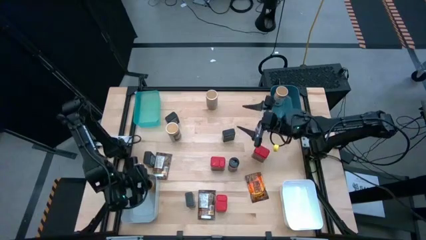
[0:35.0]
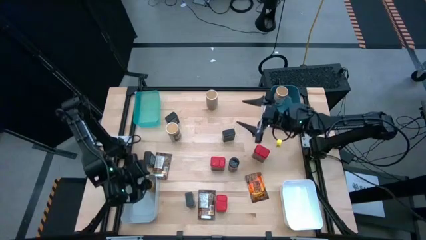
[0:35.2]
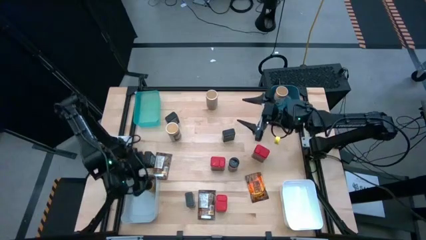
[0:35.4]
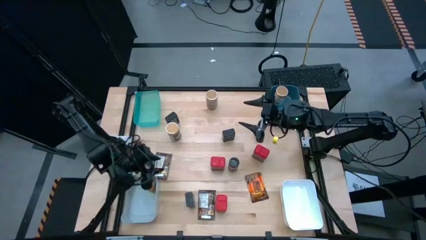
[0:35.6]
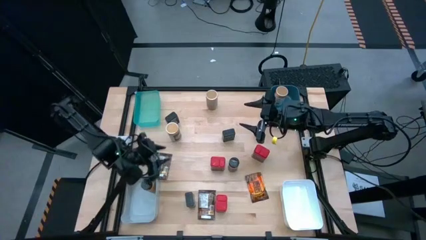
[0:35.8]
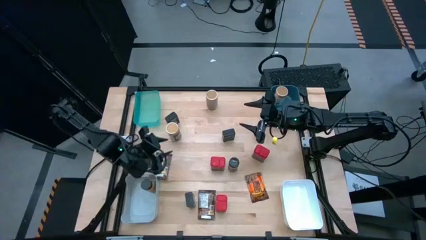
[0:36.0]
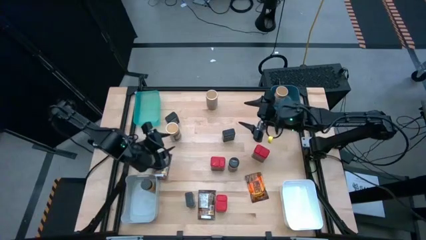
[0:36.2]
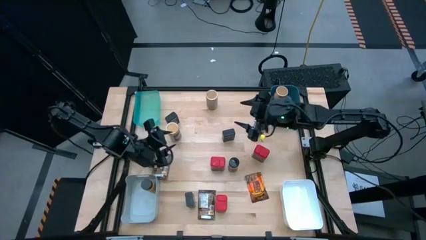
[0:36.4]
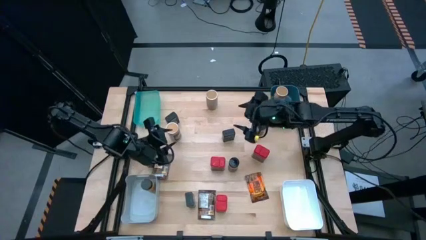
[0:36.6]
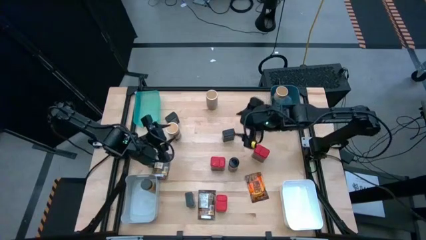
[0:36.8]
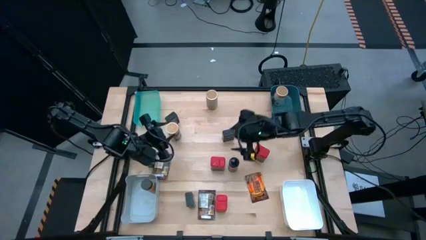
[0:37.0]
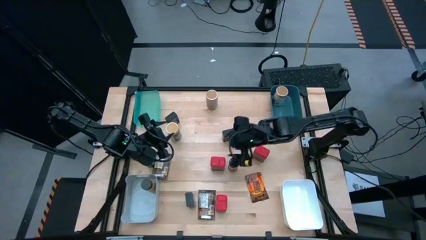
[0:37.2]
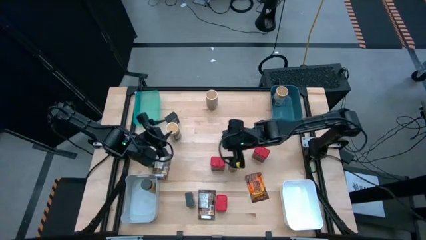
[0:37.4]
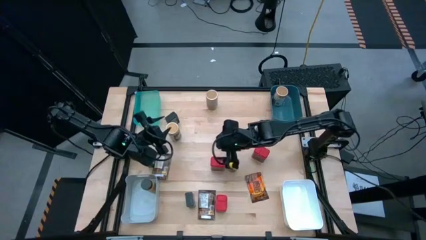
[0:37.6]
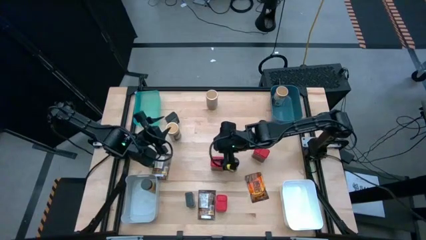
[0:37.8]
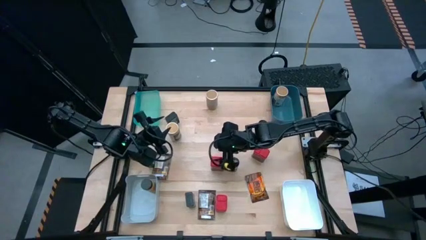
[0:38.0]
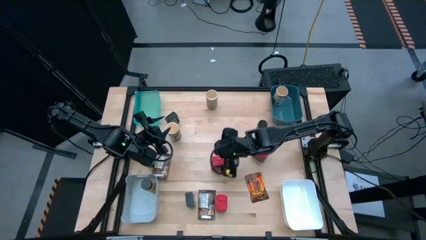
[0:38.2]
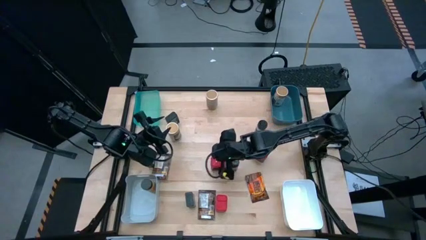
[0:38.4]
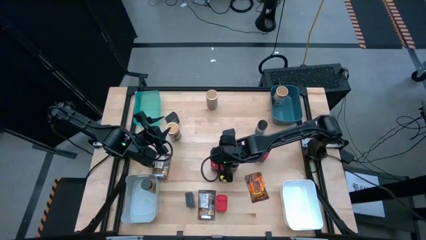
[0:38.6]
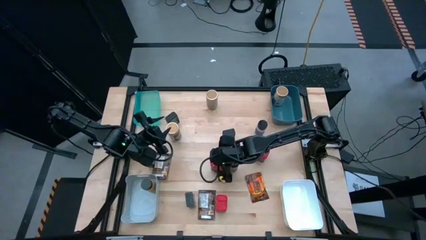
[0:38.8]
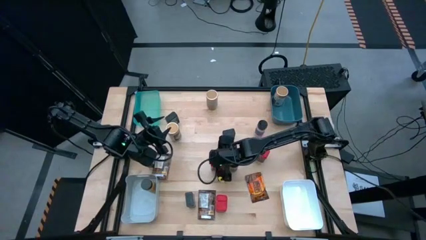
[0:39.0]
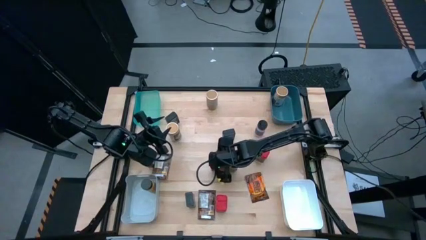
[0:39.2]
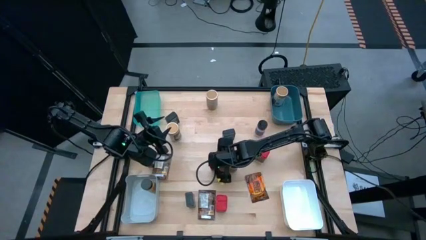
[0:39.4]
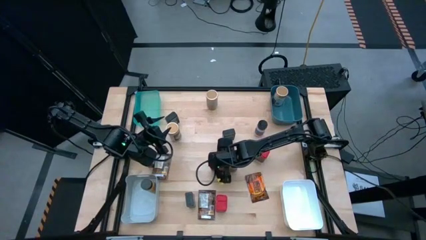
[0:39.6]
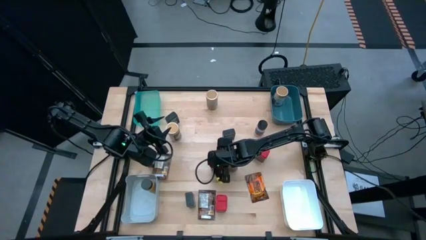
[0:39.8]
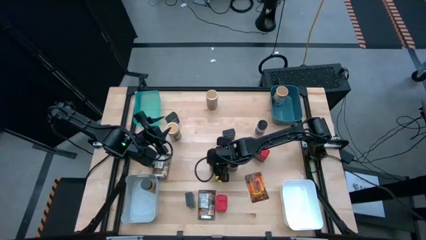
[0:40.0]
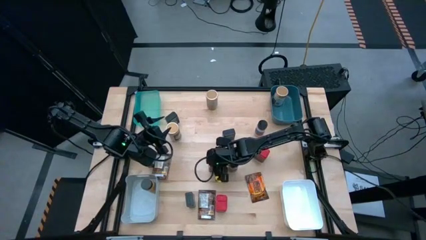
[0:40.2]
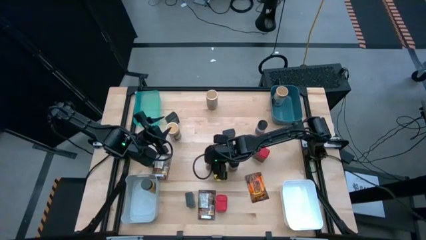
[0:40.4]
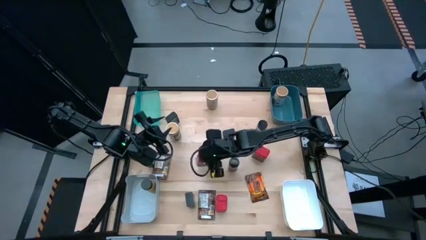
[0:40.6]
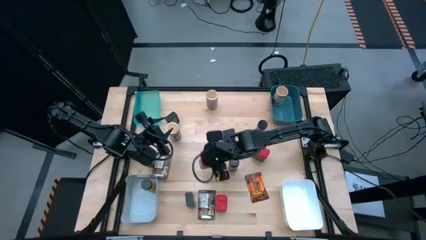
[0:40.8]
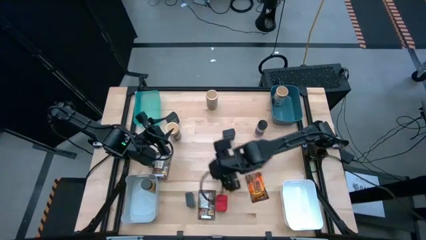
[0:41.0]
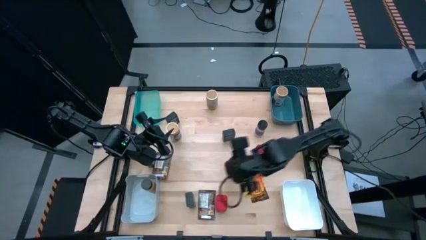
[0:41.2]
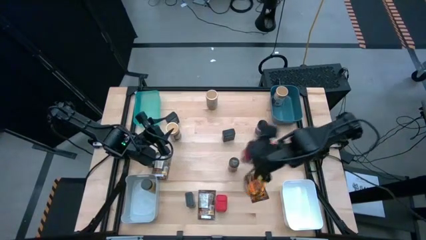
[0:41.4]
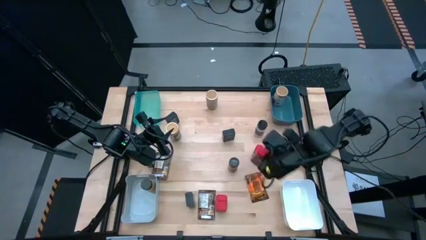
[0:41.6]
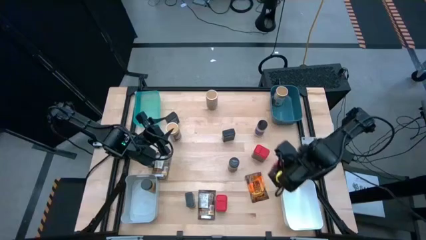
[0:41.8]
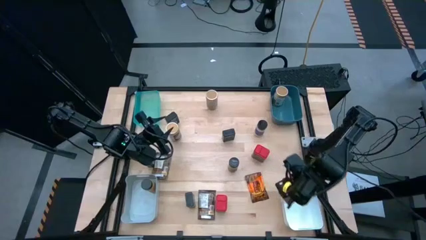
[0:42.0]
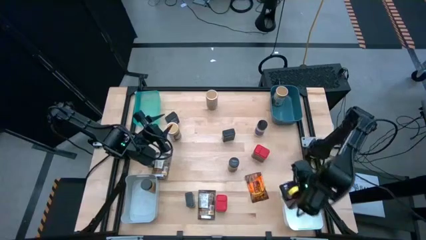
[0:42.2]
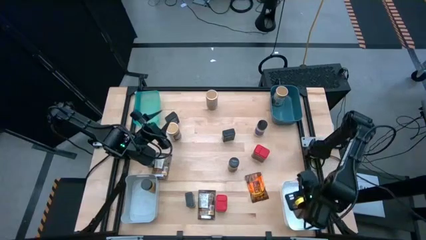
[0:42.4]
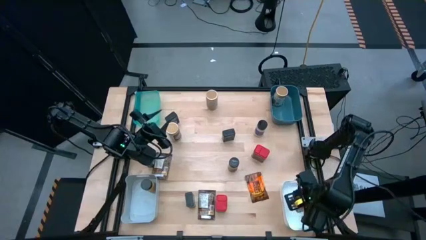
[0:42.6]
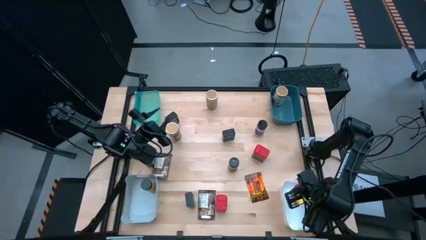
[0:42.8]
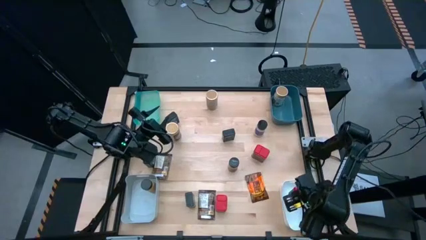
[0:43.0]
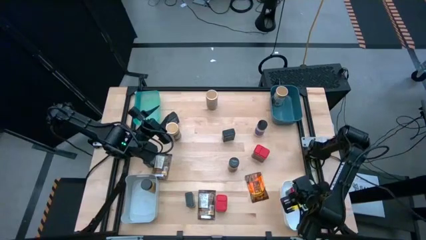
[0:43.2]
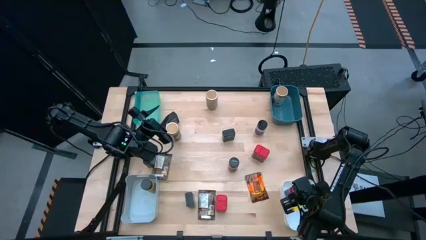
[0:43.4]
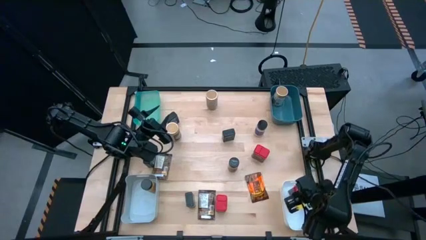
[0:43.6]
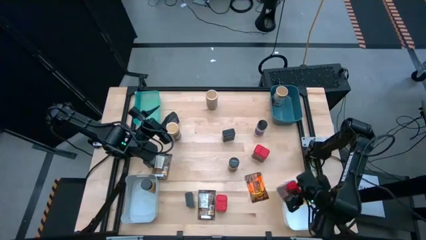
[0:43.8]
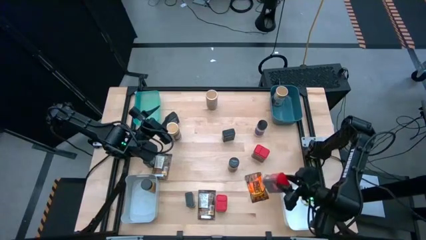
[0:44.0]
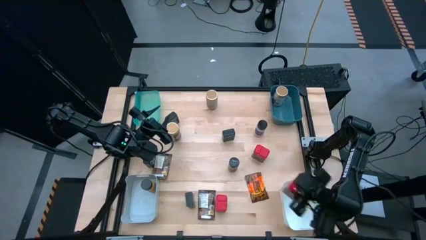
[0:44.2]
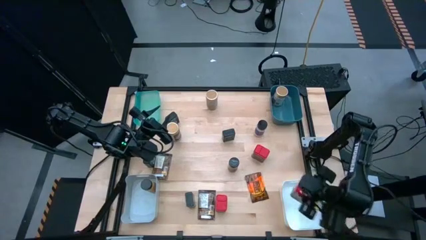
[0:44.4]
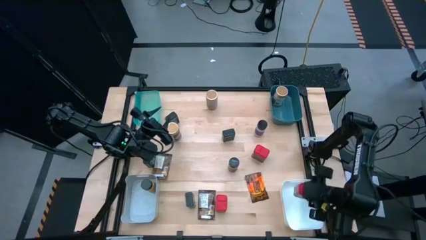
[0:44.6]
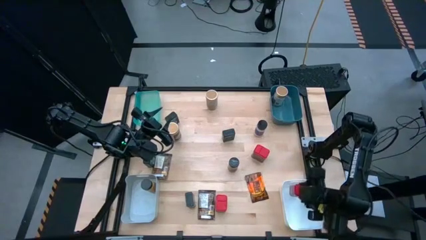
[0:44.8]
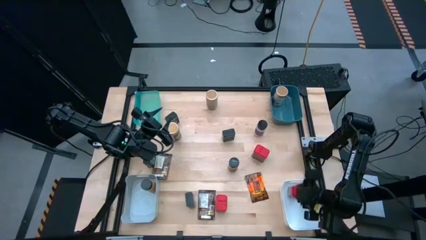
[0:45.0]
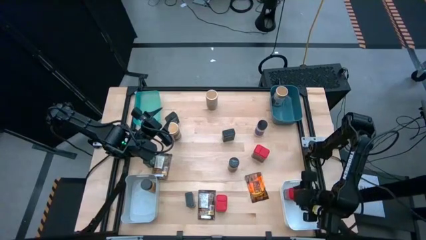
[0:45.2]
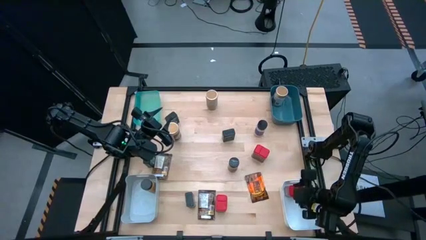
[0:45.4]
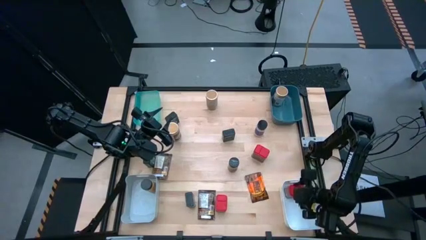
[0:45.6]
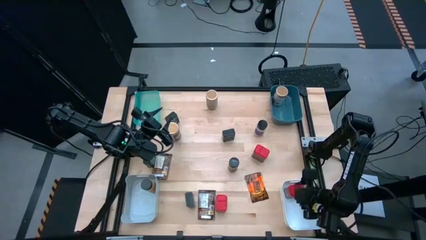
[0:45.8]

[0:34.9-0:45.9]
Task: Sort spices by type
Put the top left red seasoning can into the white bin
